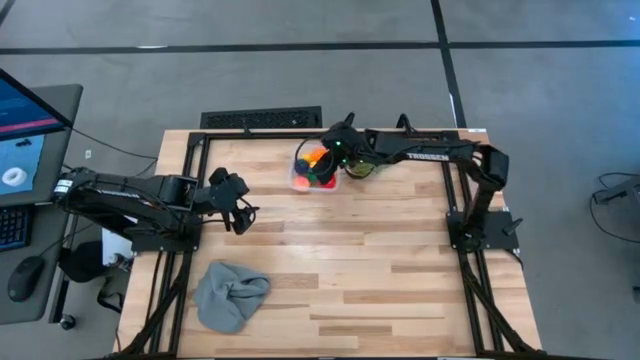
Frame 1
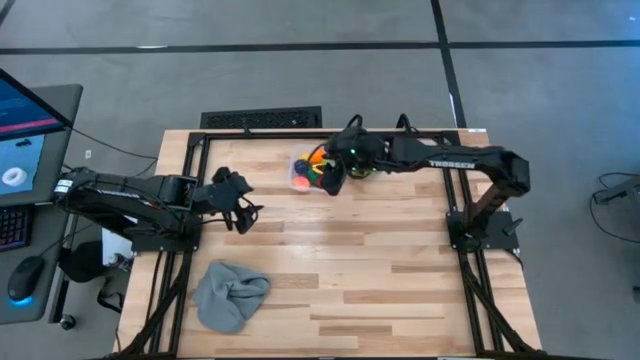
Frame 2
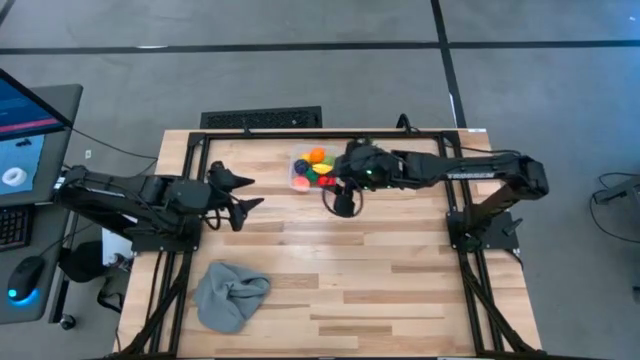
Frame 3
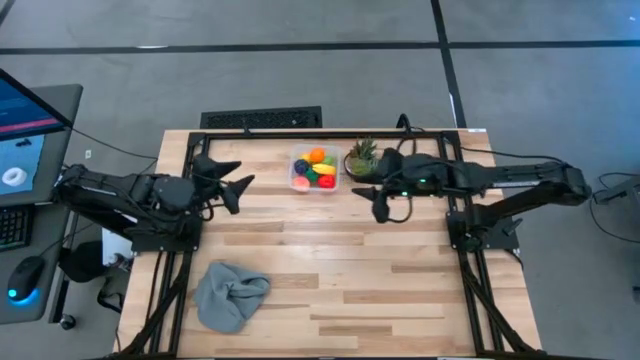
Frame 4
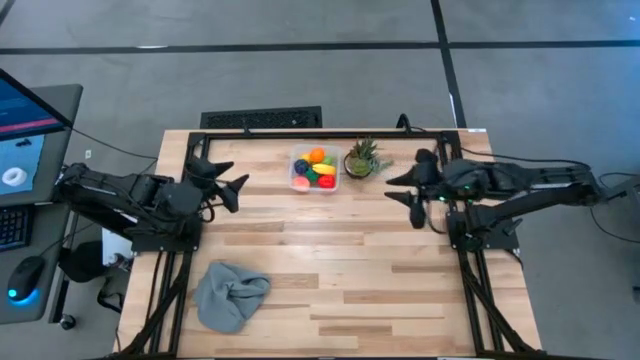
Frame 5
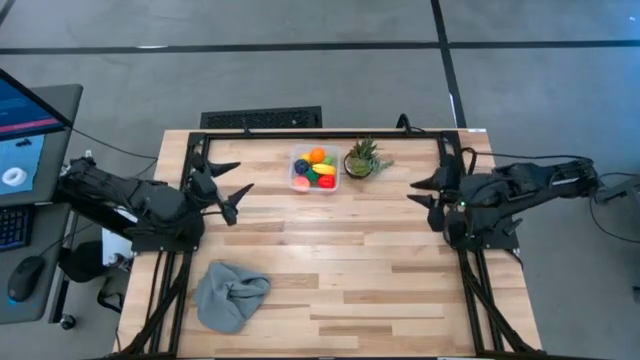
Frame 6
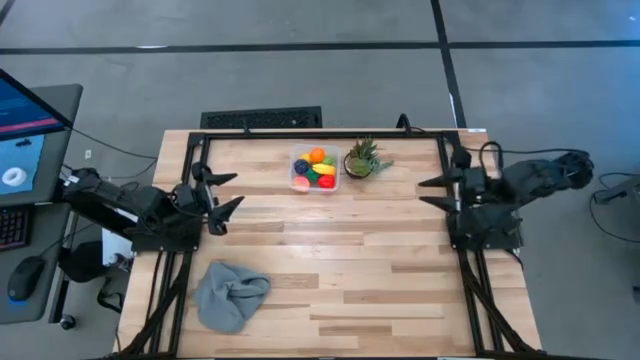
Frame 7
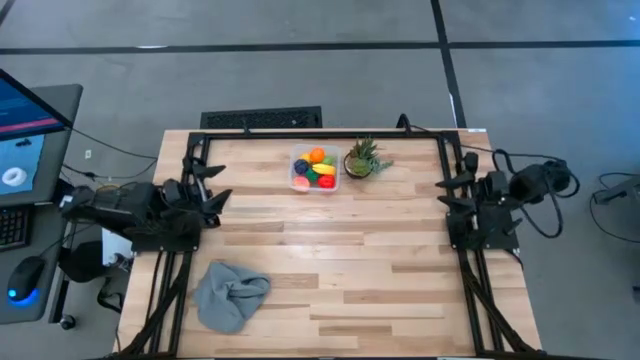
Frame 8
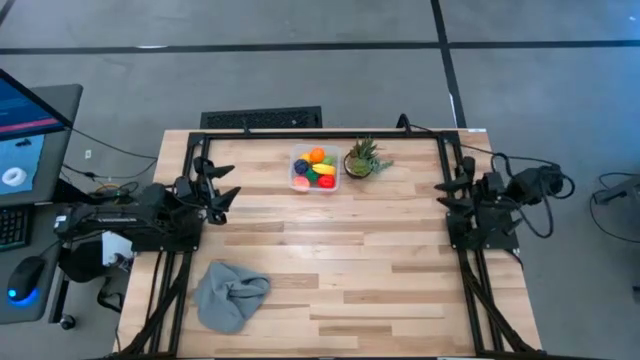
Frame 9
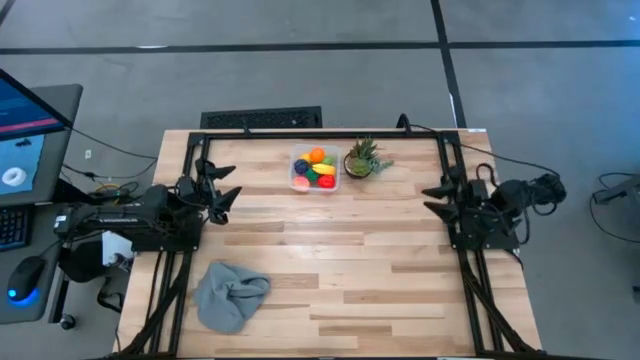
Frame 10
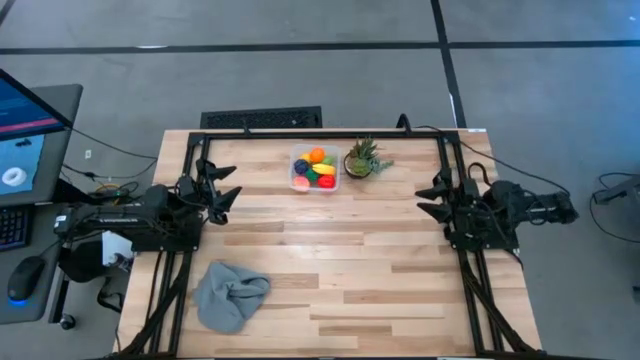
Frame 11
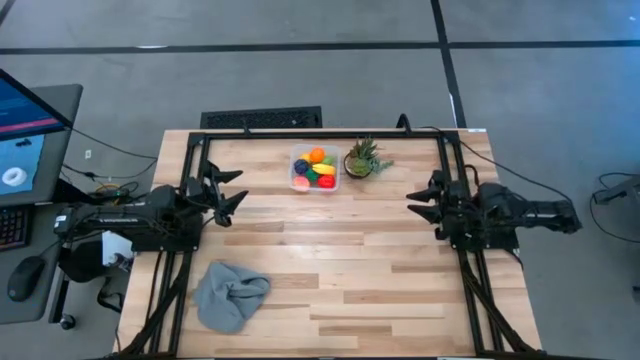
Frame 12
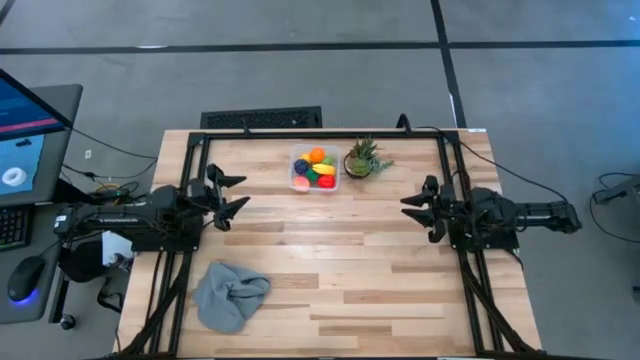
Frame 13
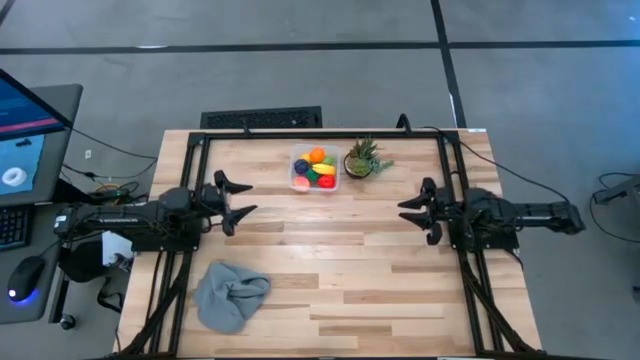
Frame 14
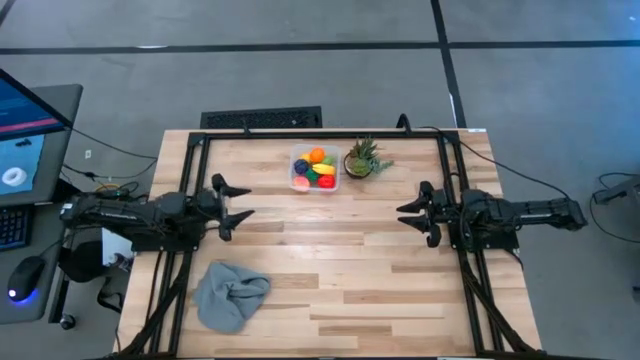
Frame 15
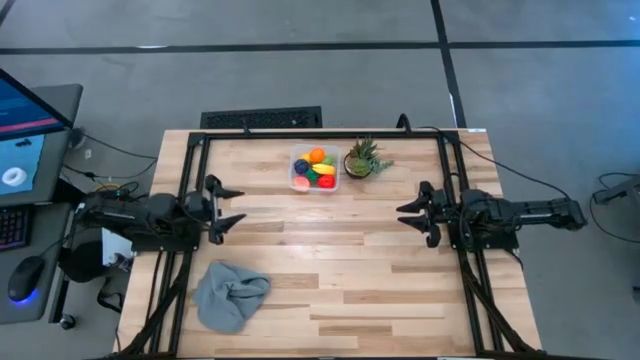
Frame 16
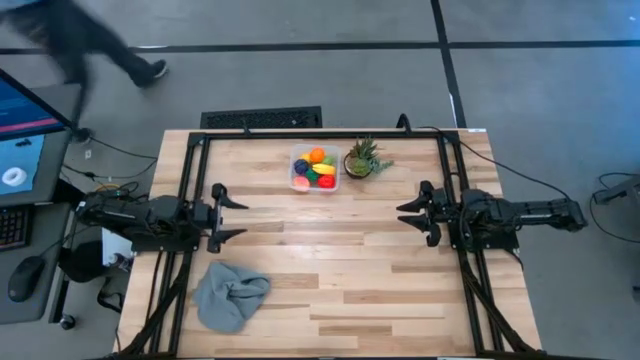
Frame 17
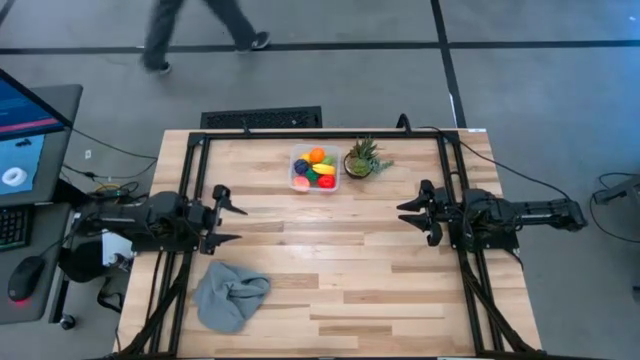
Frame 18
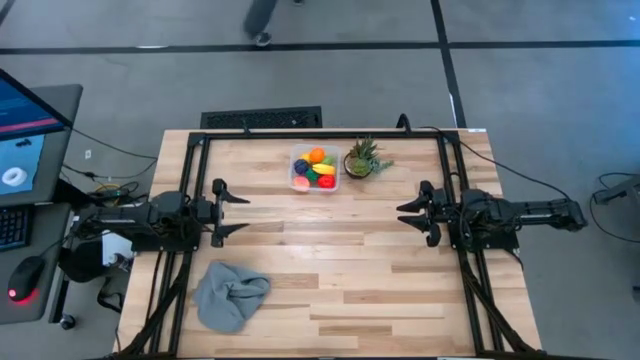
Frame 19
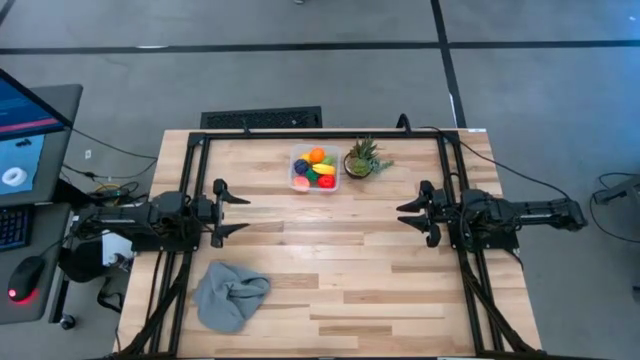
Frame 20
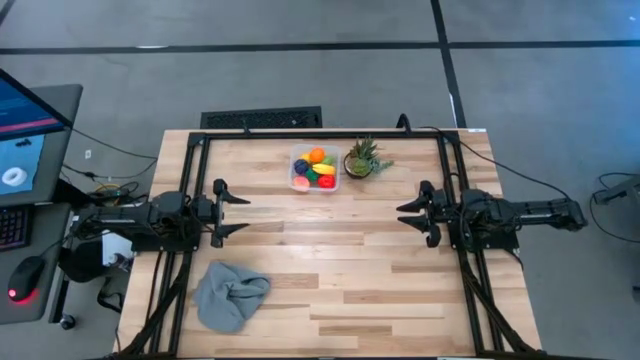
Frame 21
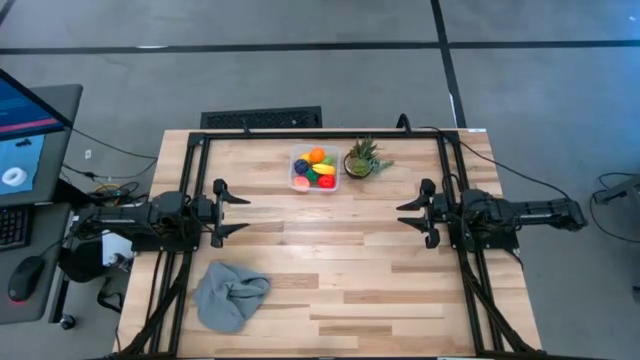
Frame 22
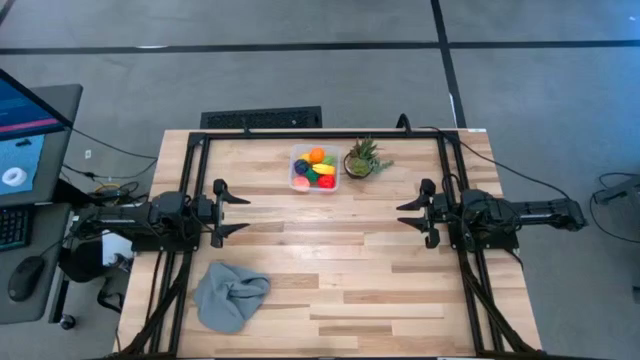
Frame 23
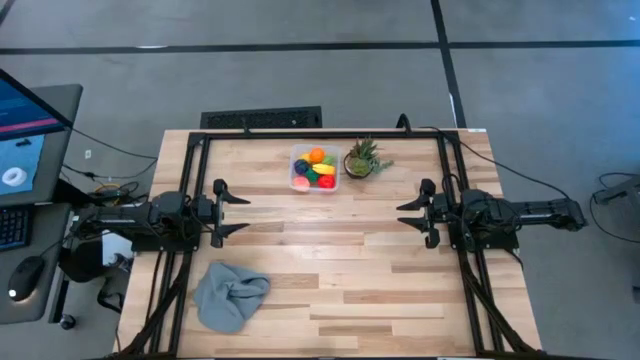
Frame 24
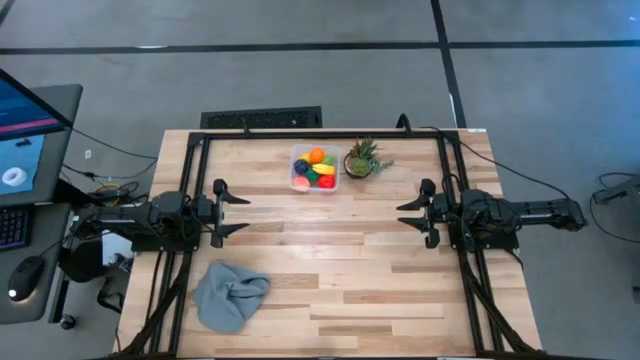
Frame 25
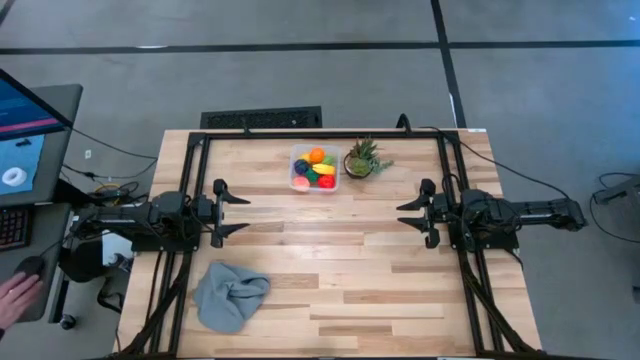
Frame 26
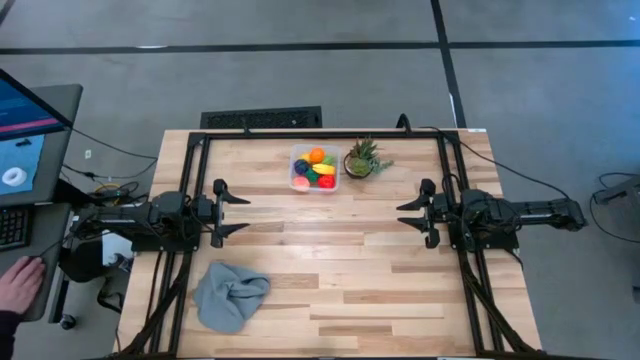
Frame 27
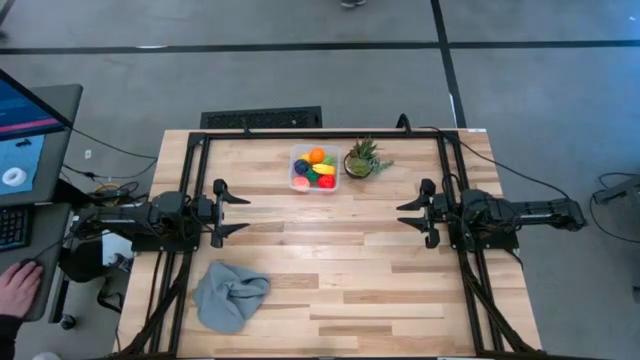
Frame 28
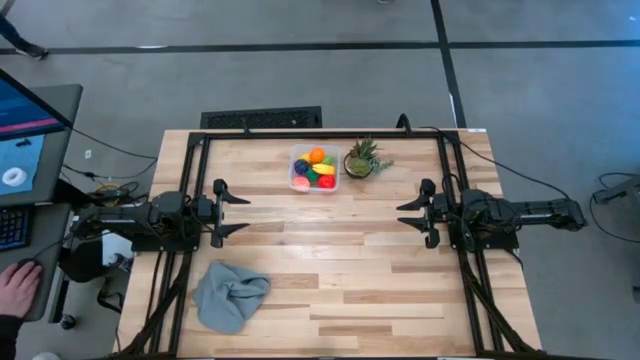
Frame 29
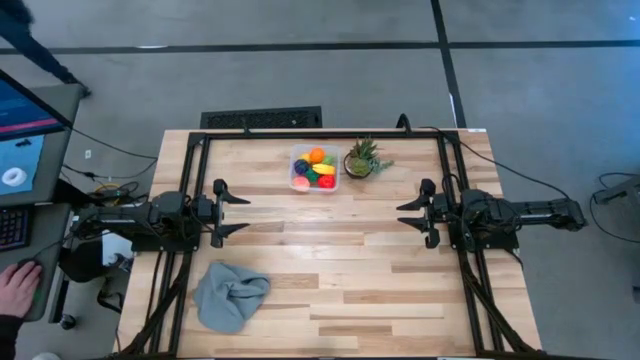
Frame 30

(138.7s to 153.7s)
Task: Pick and placing Produce into tupperware
Return to Home Position

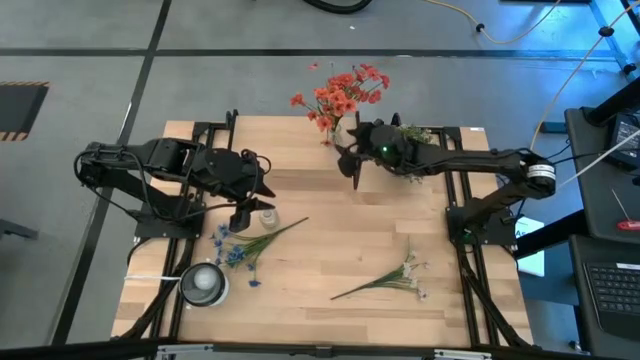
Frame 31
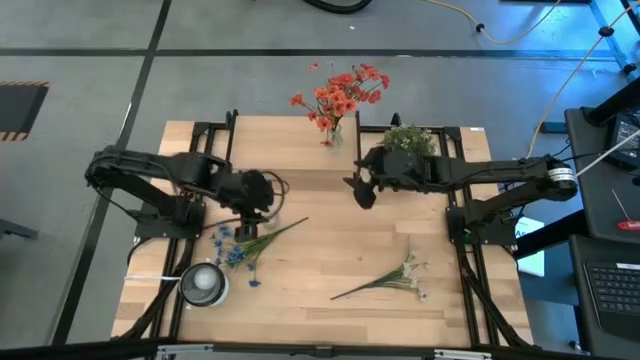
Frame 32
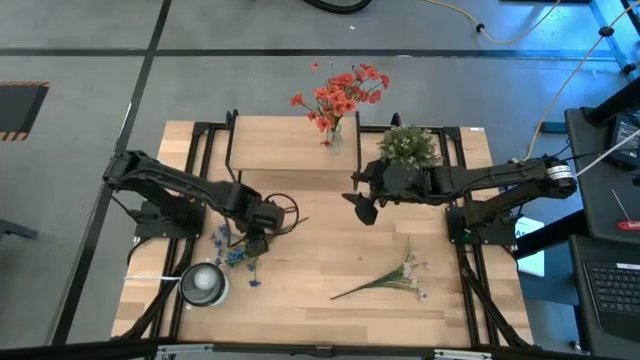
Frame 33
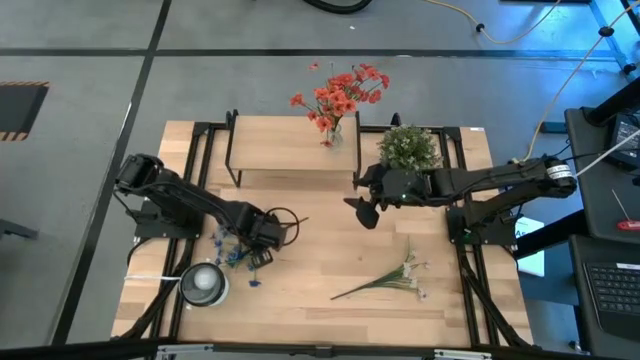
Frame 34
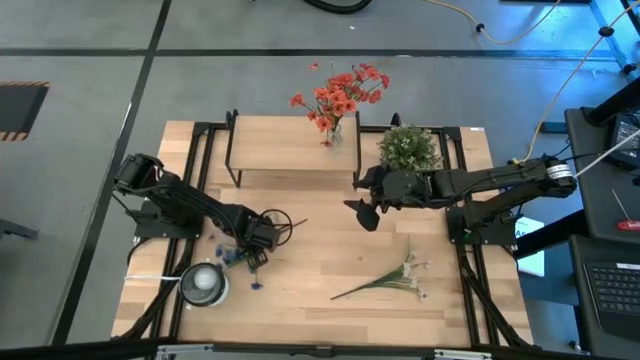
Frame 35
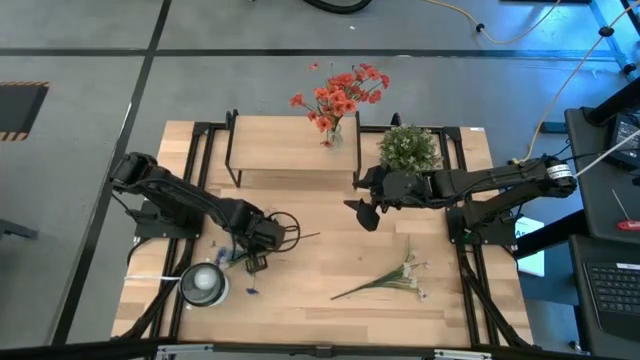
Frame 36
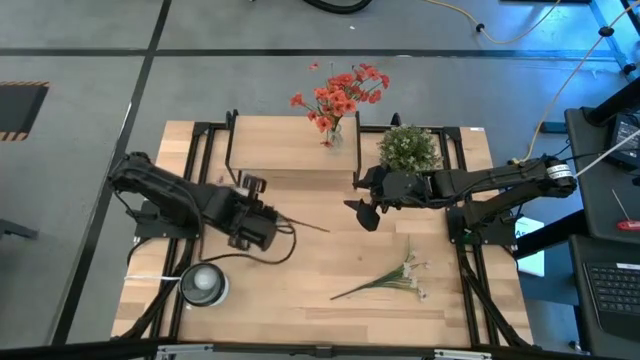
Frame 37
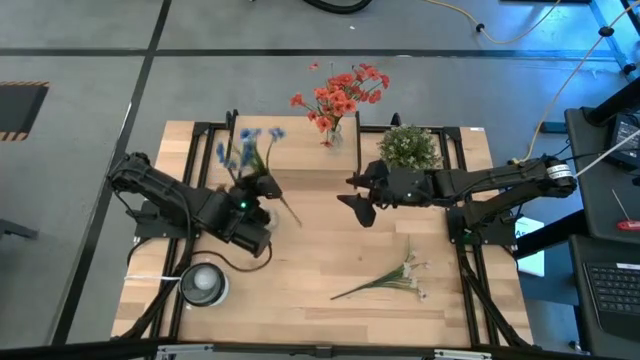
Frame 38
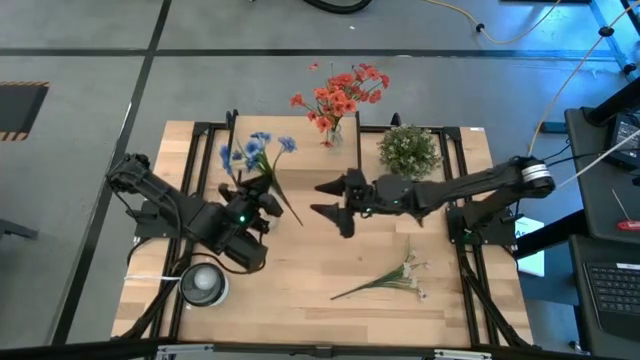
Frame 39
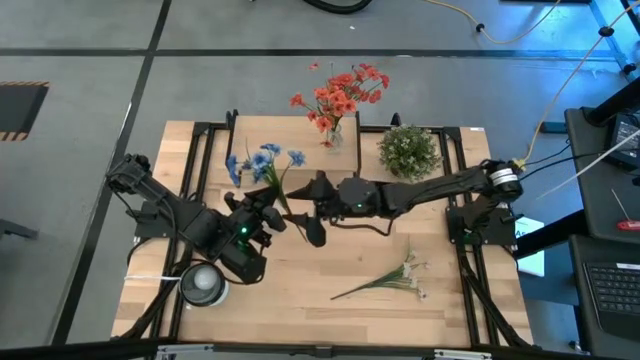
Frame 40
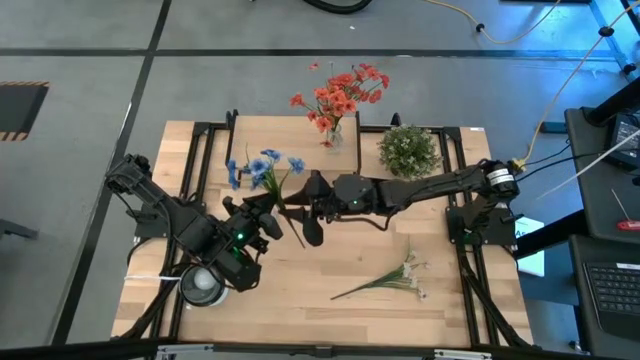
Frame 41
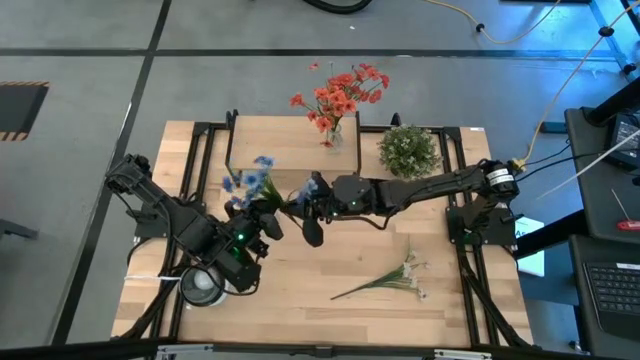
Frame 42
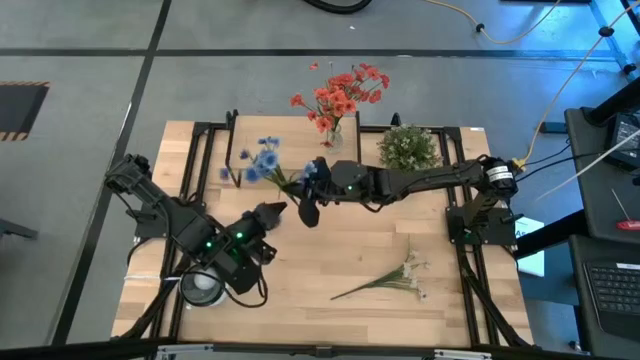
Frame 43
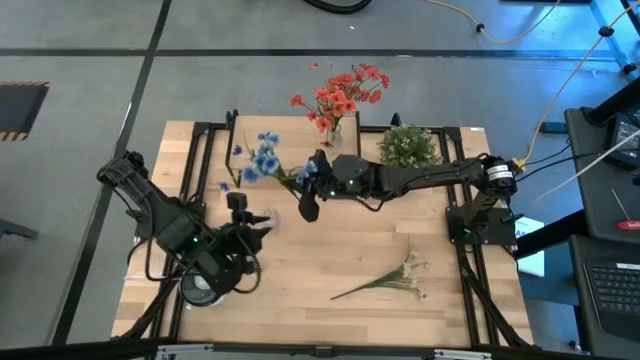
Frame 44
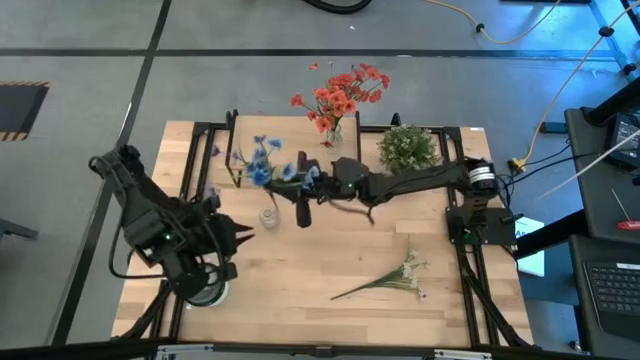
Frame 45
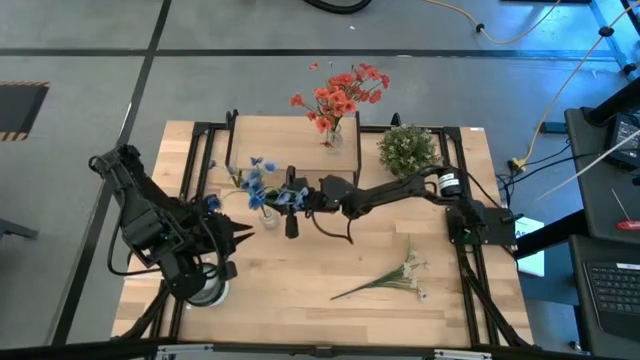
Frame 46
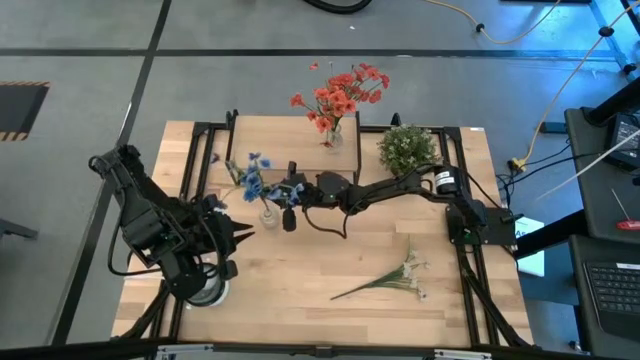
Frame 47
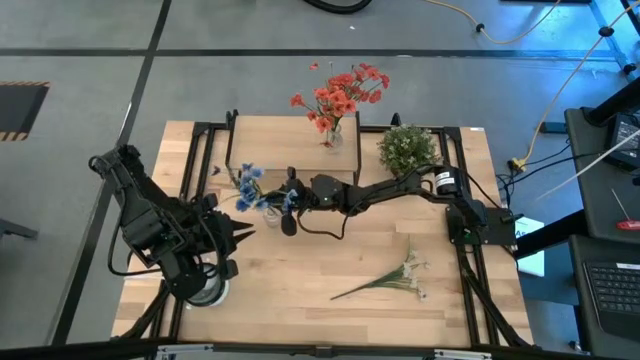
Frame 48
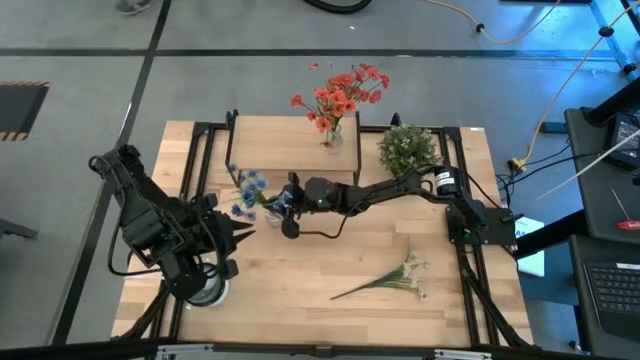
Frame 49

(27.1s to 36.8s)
Task: Pick and place flowers into a vace then onto a shelf
Put the blue flowers into the transparent vase
